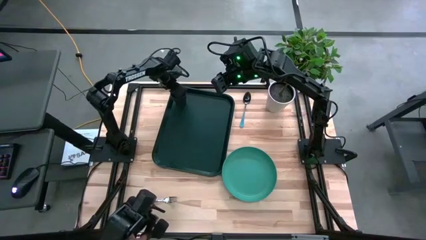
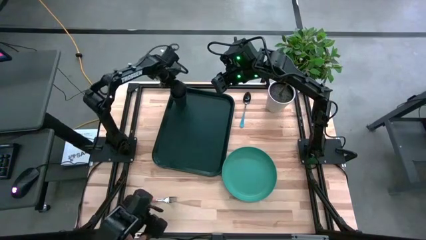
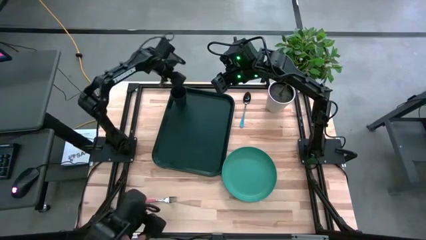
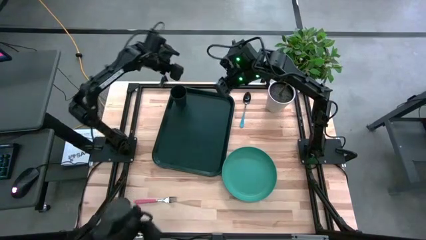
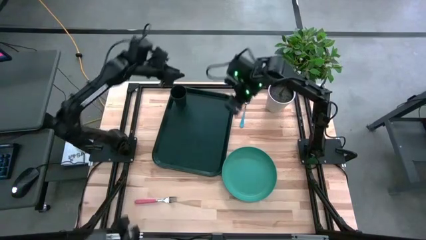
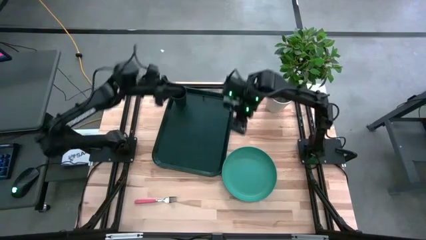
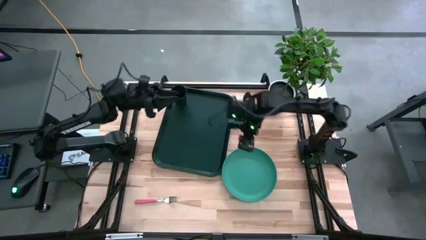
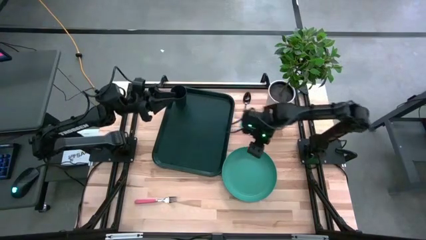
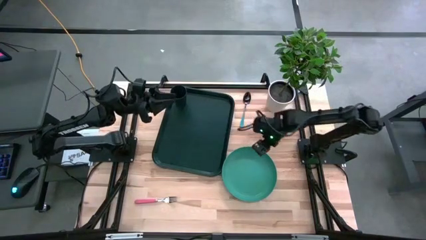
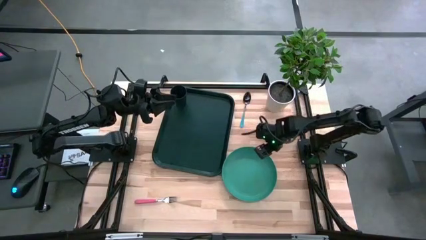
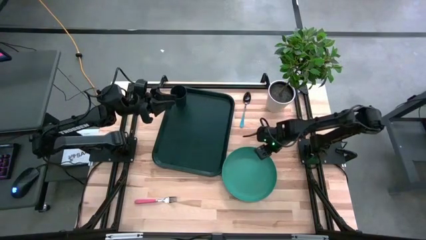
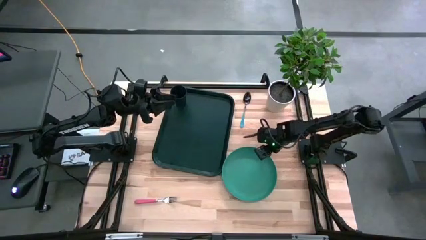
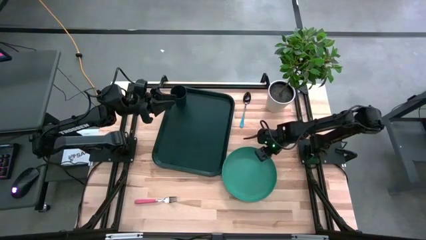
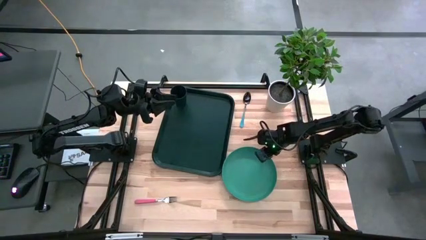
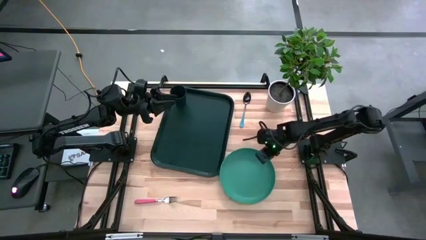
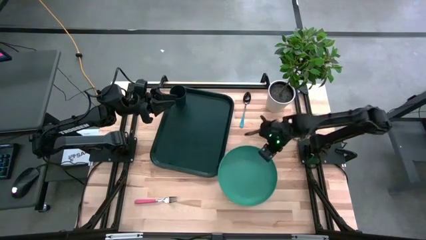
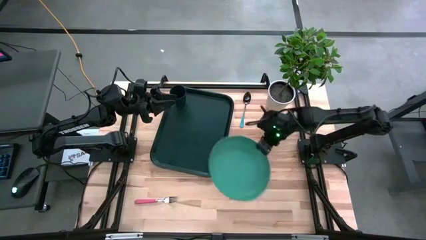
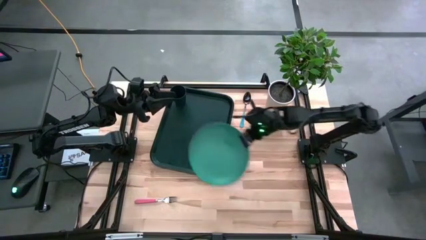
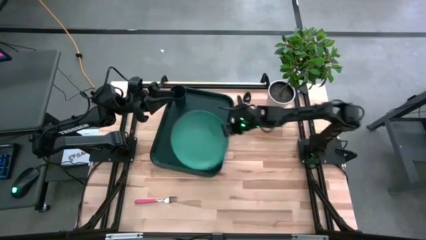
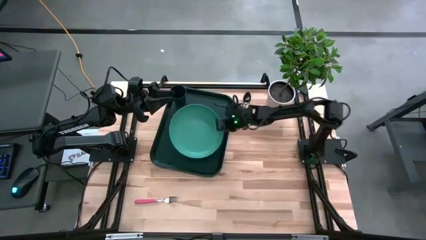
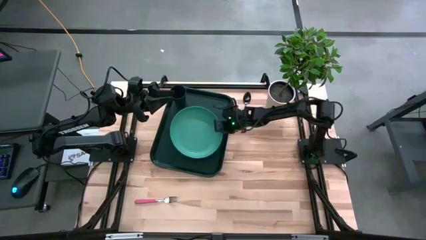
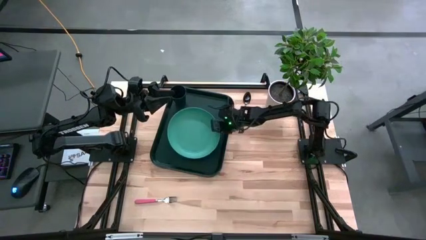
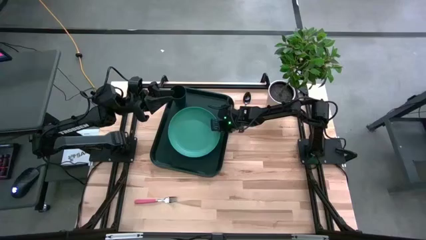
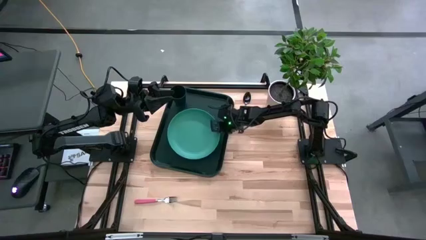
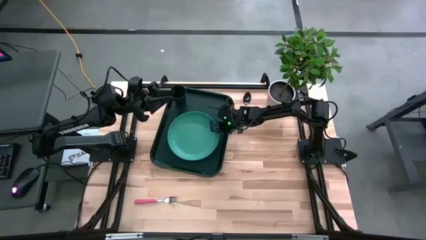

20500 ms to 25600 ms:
Task: Pick and place plate/cup/fork/spoon on tray
Put the green plate on the black serving tray to the bottom right of the black cup

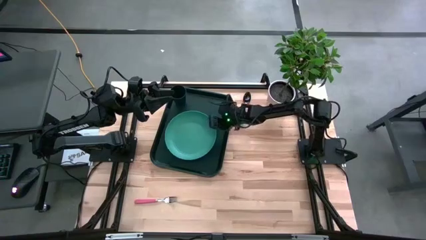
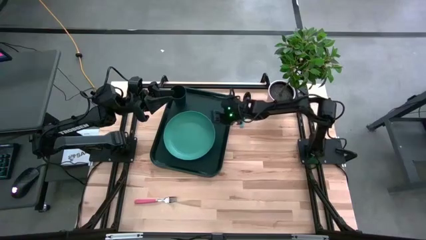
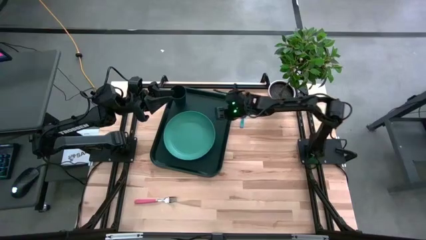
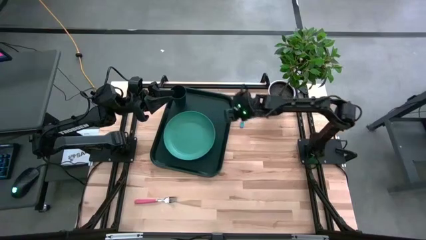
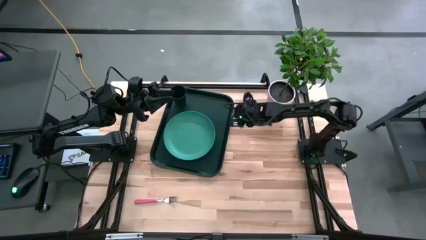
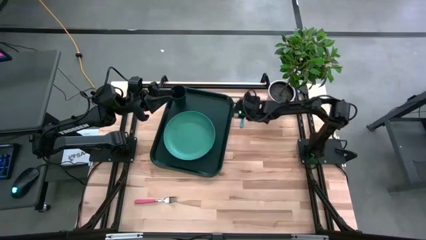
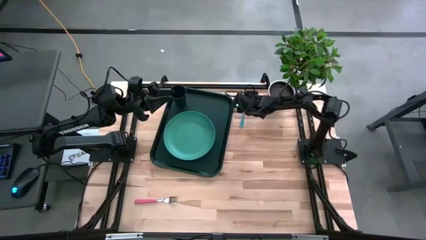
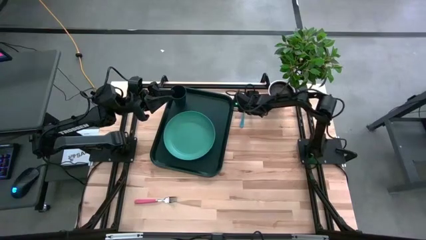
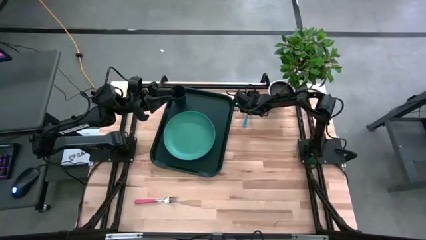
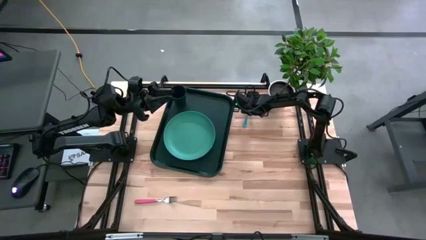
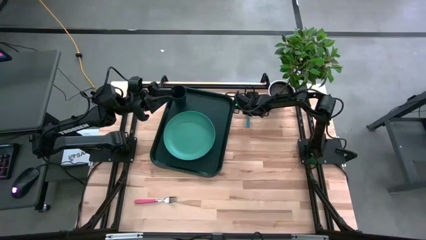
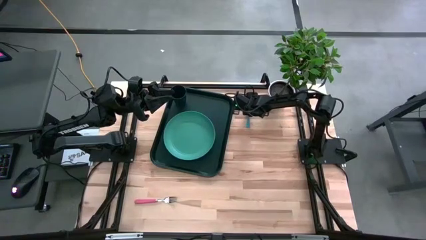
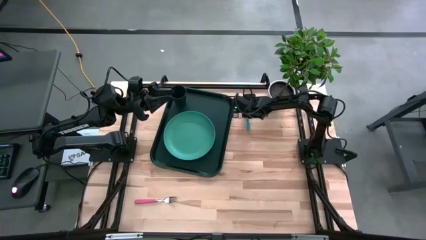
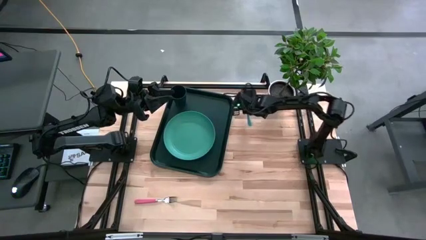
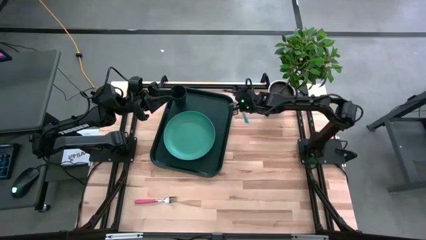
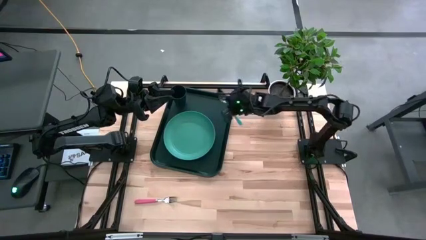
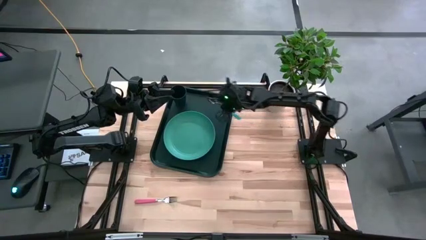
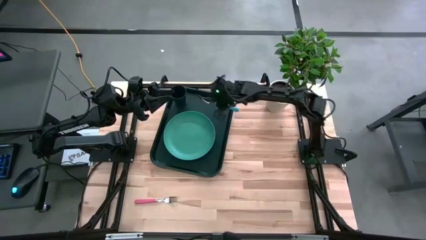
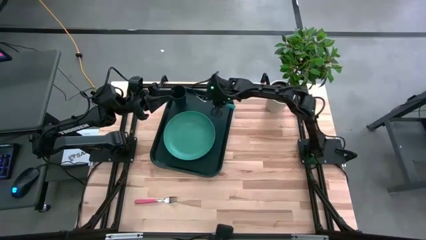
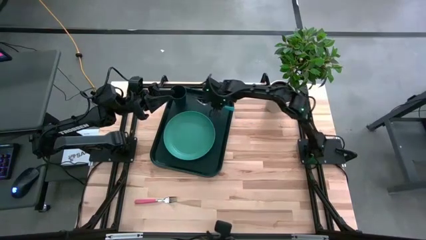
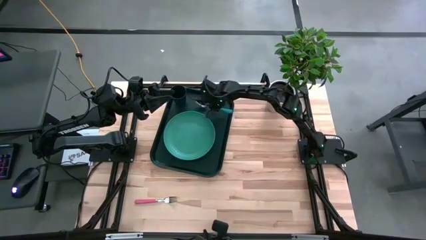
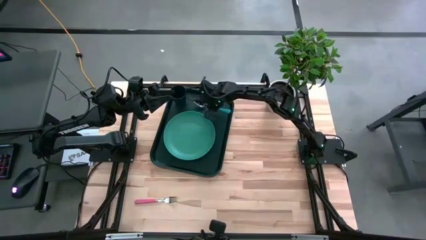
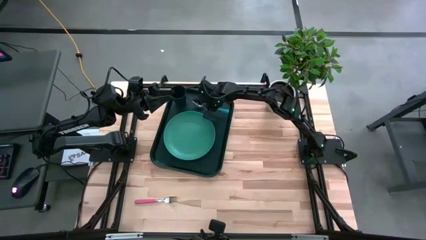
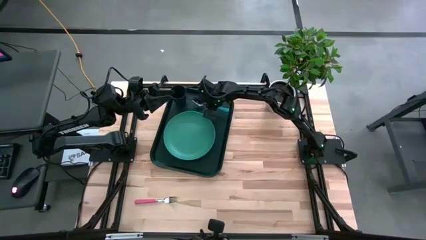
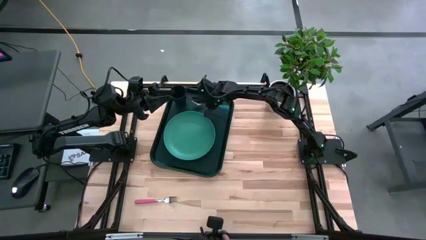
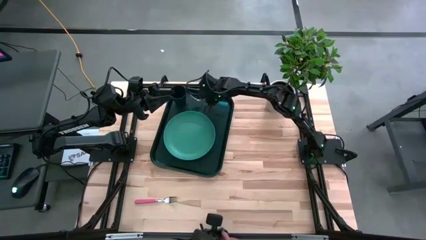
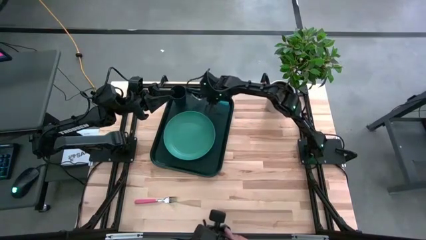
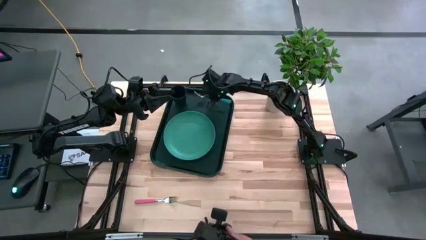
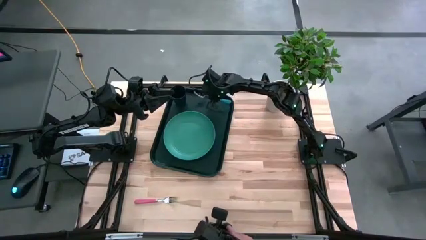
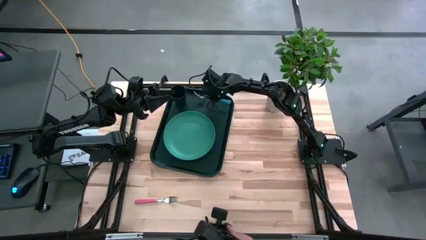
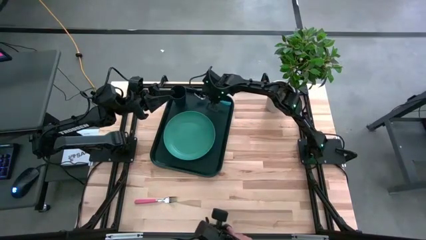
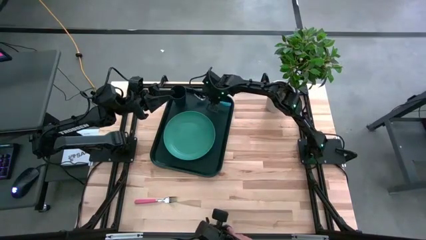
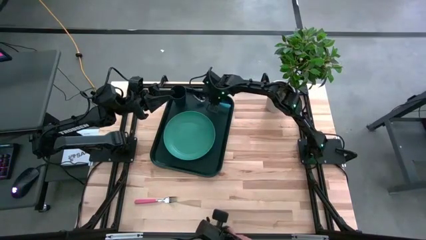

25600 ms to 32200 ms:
Put the blue spoon on the black serving tray to the right of the black cup

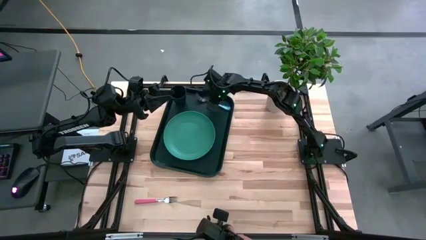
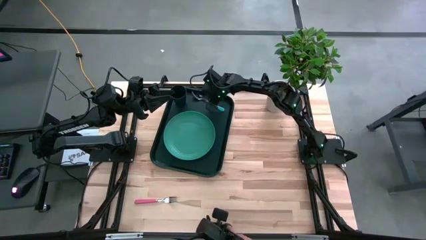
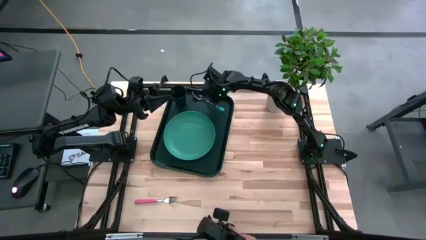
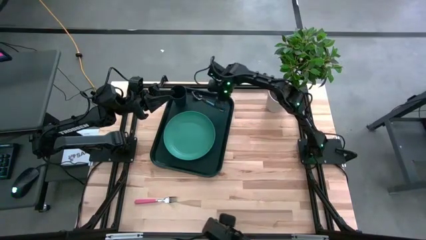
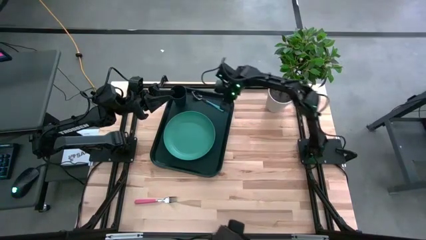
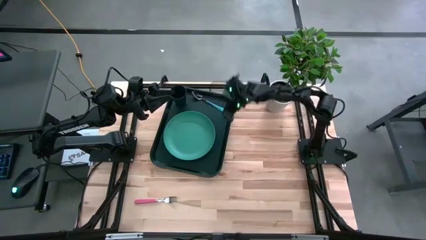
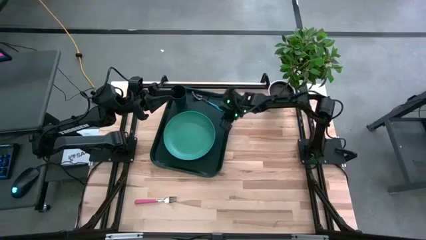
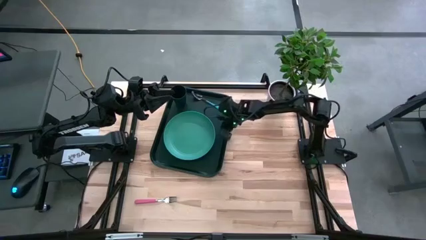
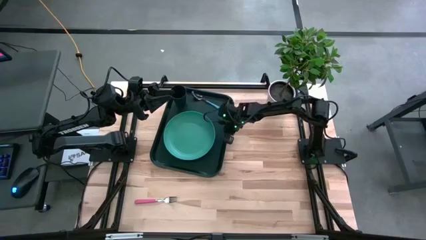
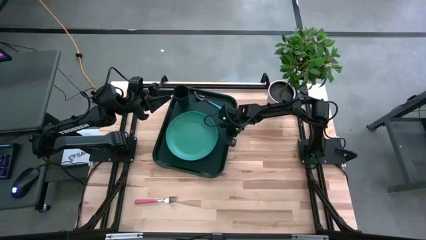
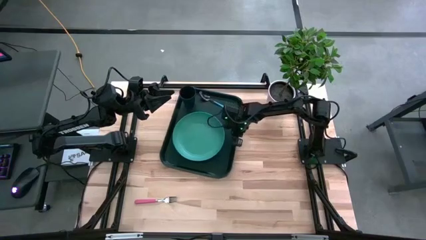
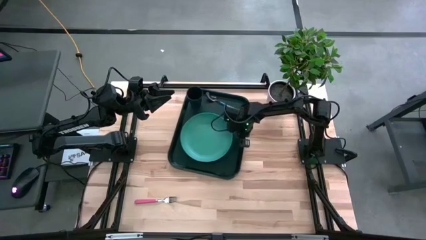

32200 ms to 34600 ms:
Adjust the black serving tray on the table

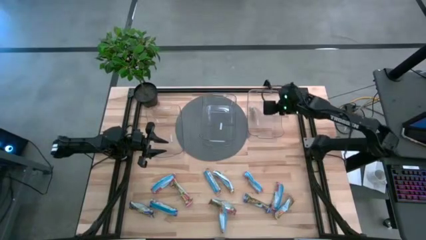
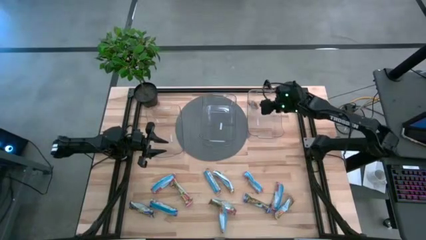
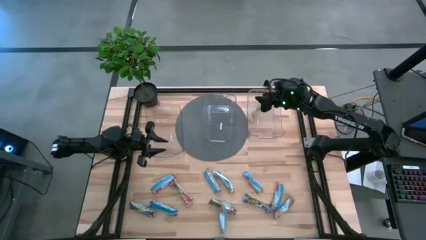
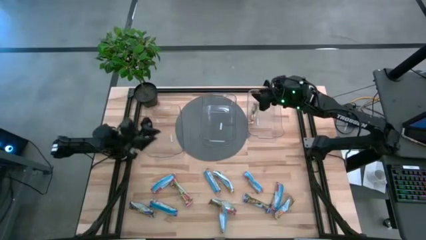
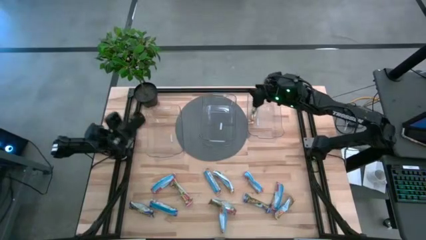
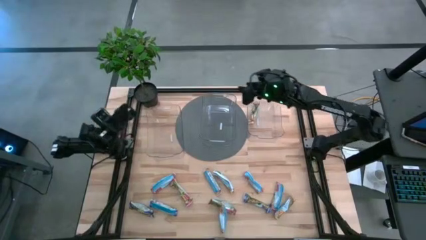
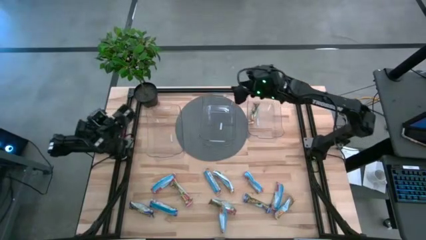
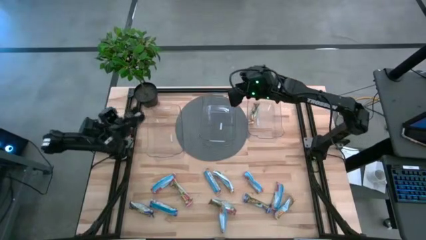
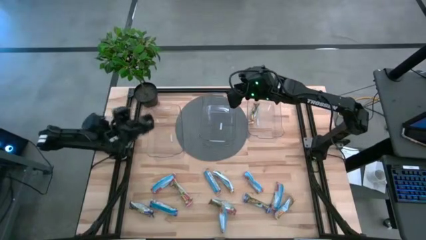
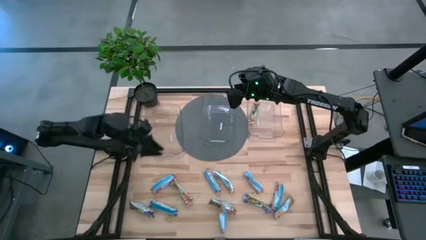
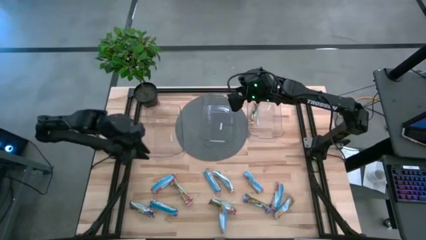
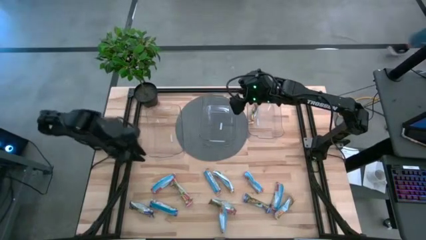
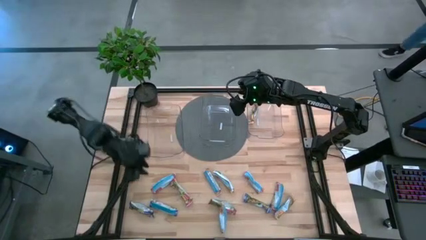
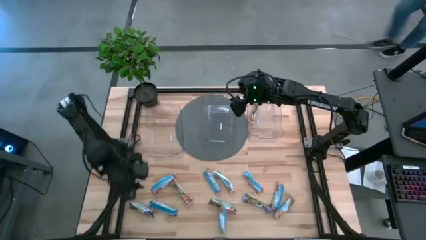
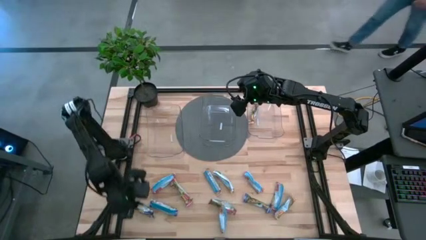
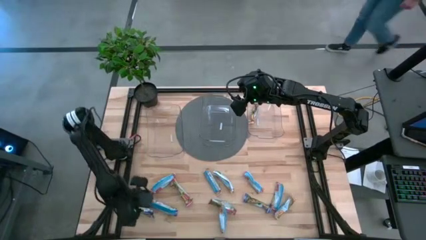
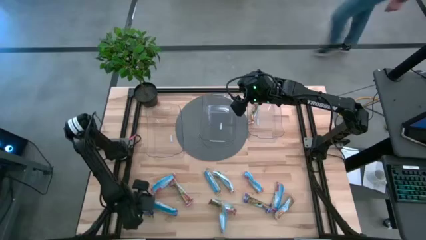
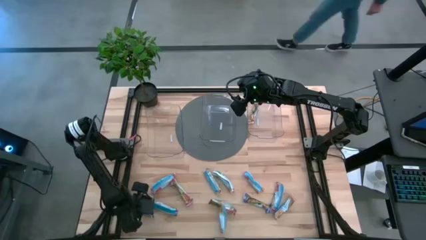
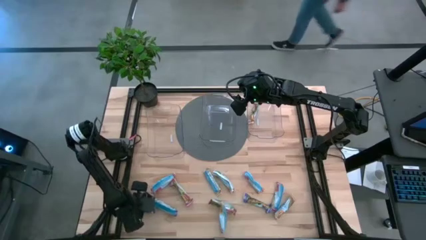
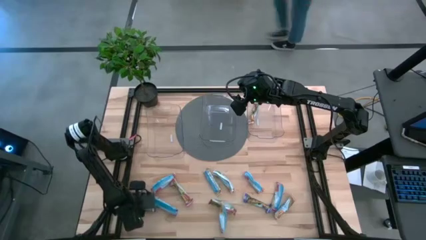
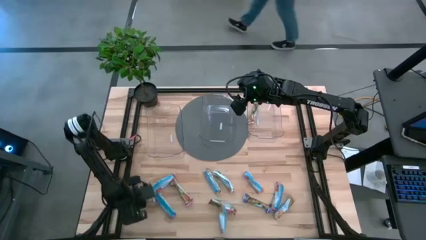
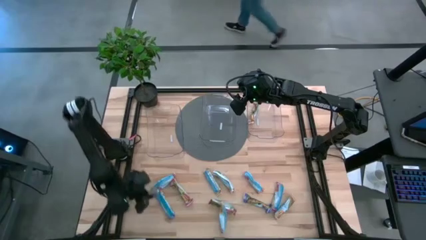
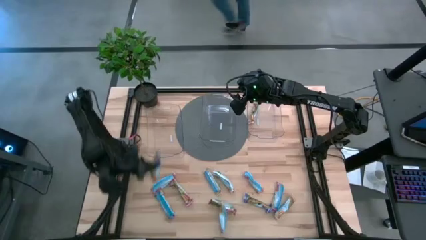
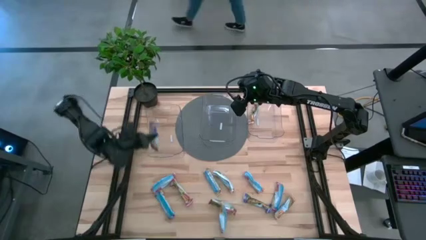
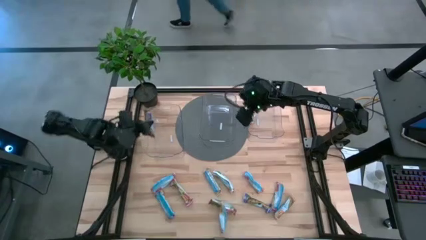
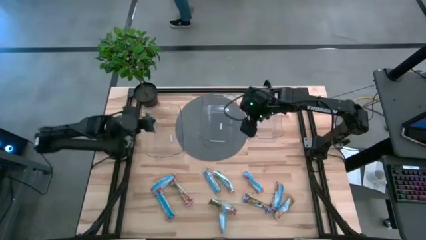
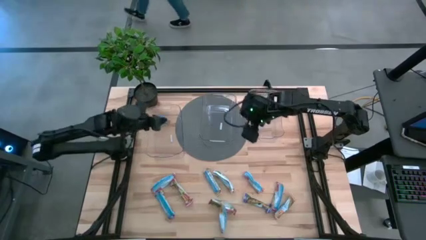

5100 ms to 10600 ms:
Task: Pick and place Granola Bars by type
Put the left green granola bar into the left transparent bin
